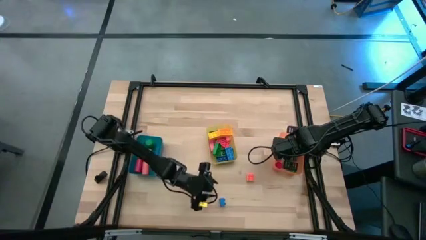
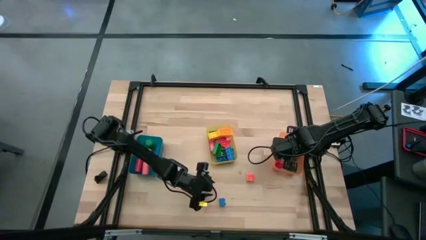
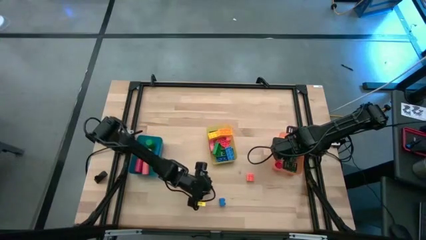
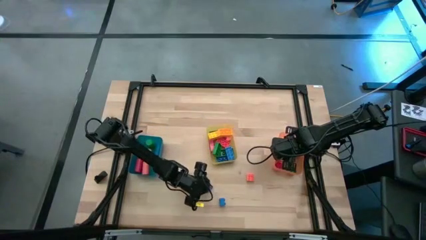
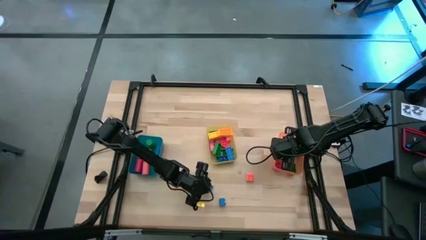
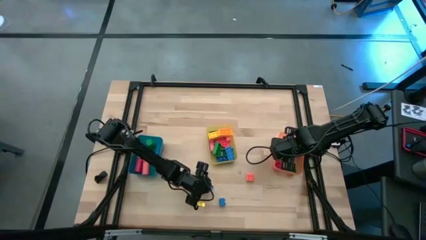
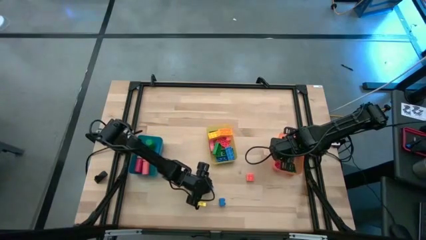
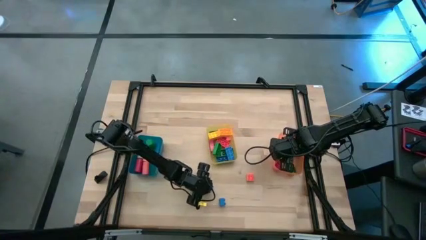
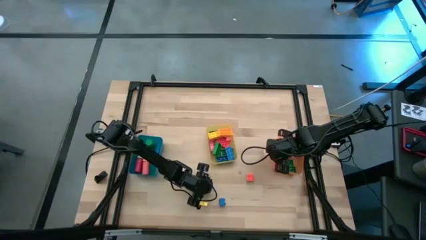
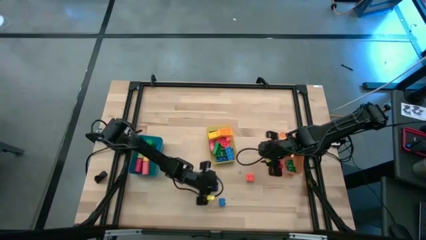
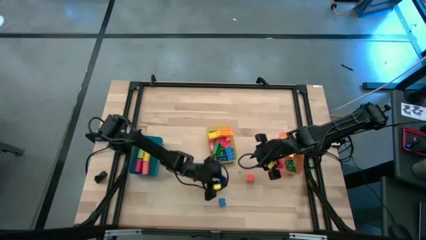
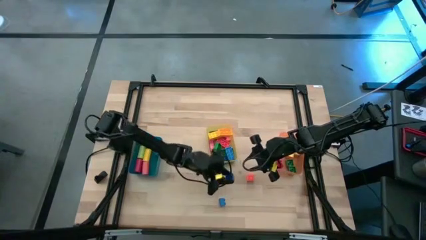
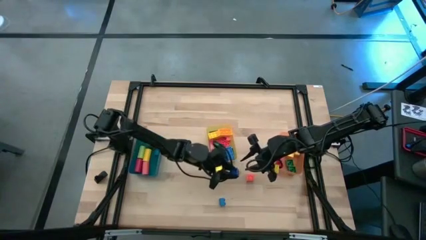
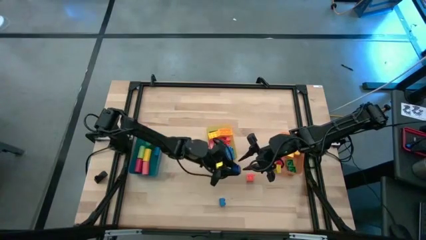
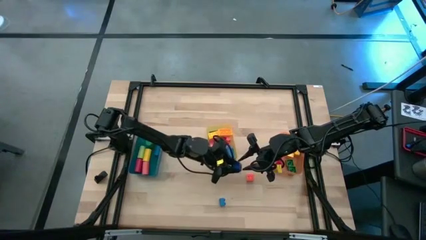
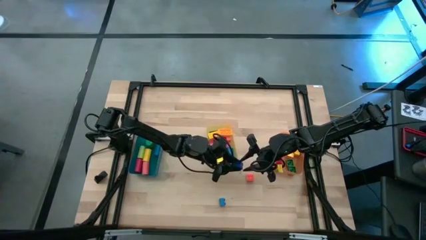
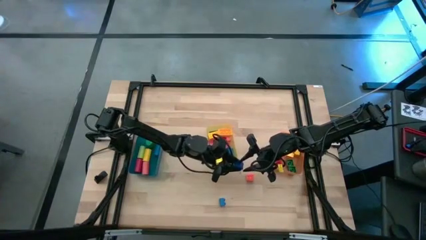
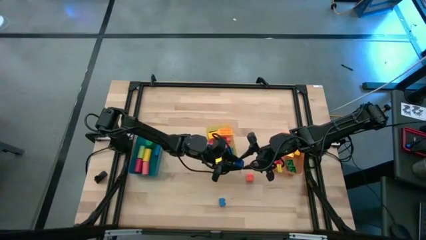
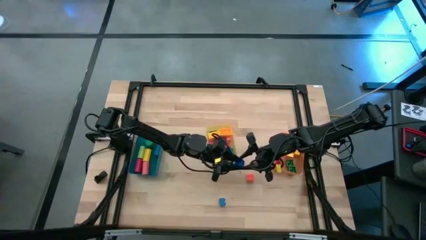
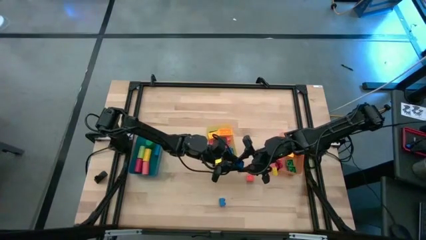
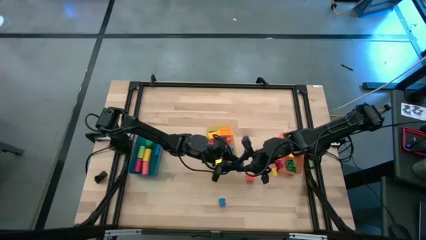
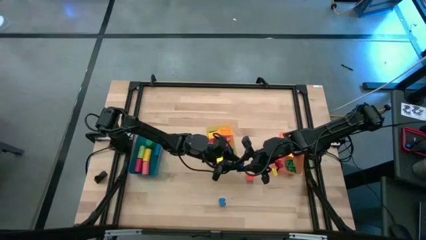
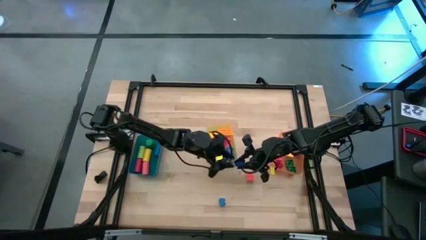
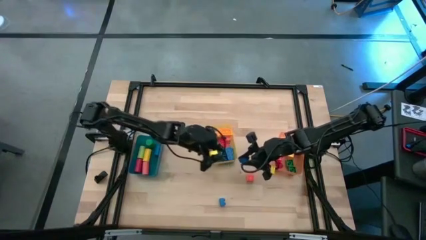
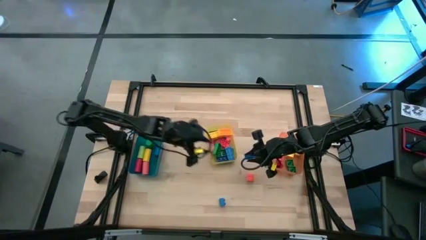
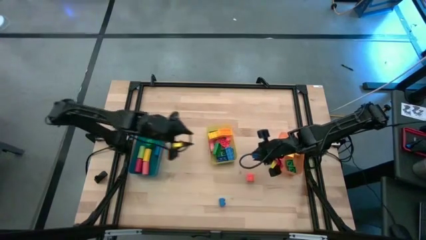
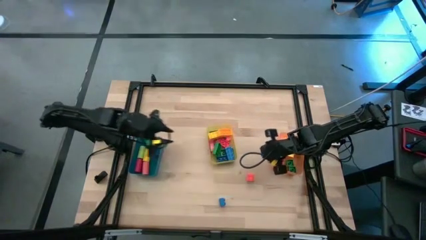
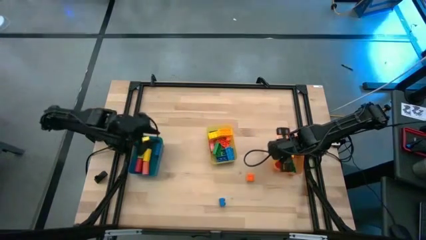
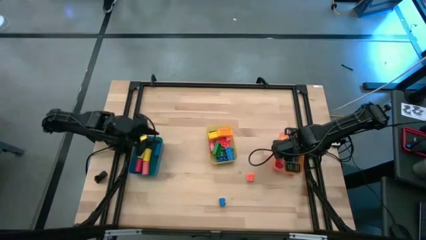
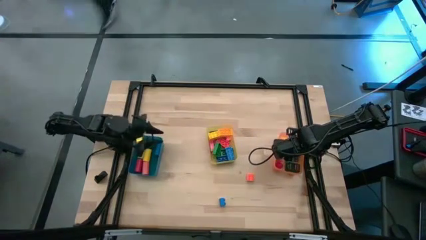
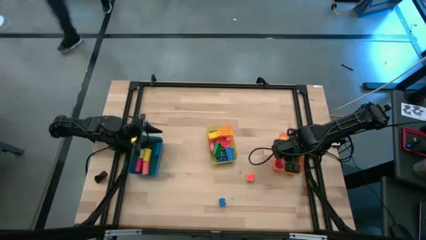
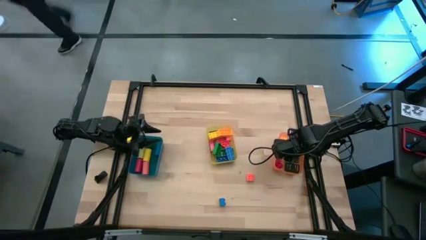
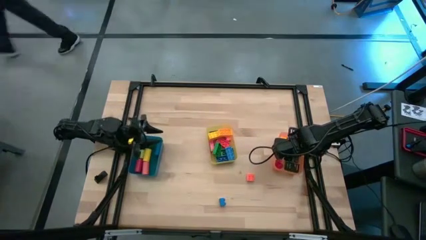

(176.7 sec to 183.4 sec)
Task: Sort blocks by size
Put the blue 4 stud game piece into the orange bin

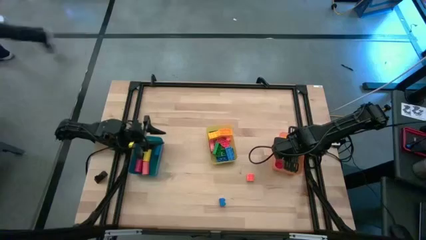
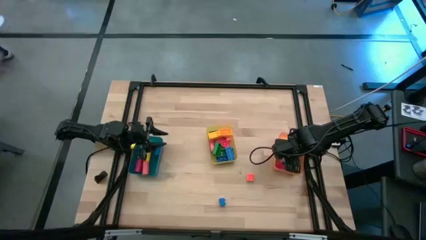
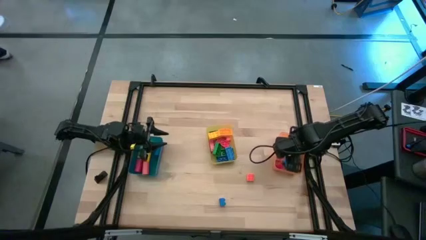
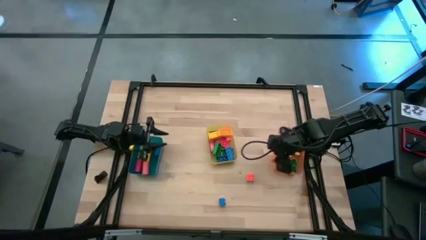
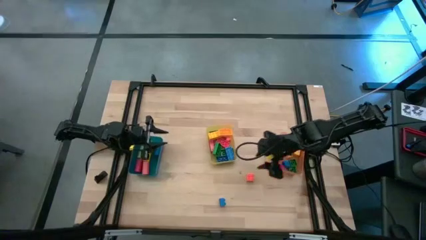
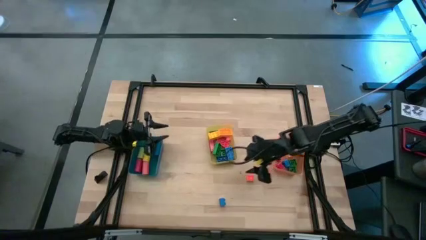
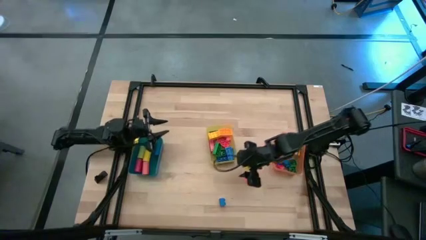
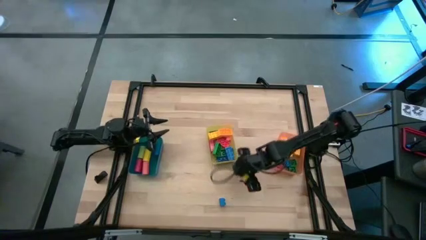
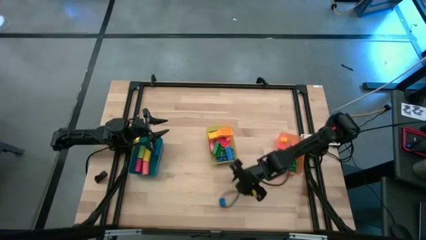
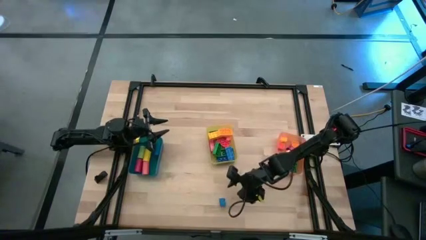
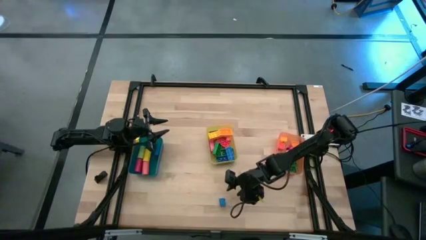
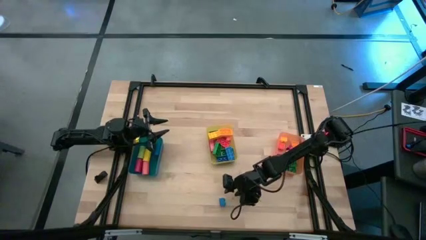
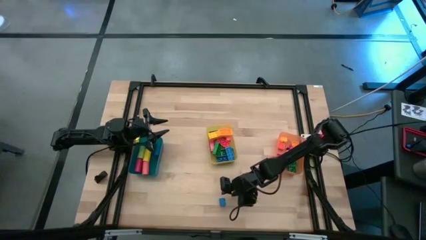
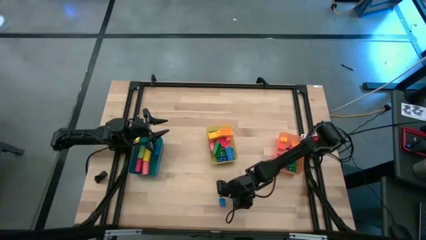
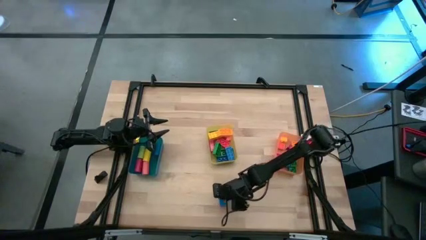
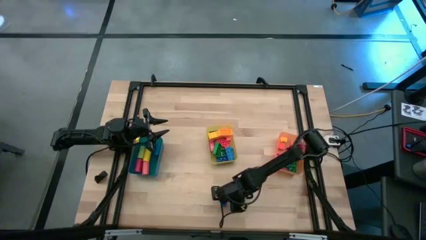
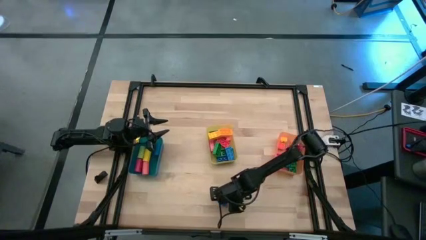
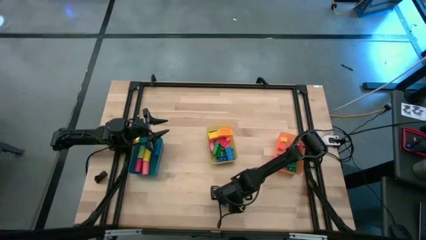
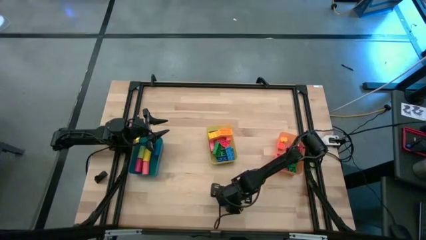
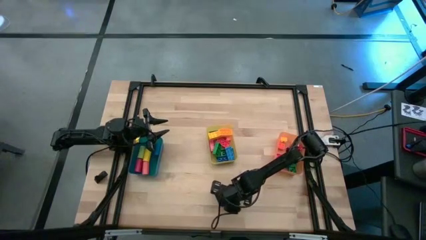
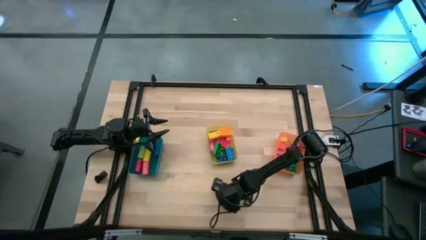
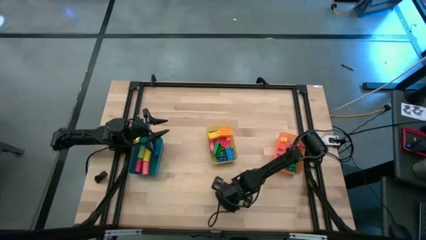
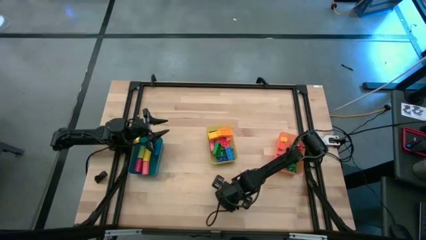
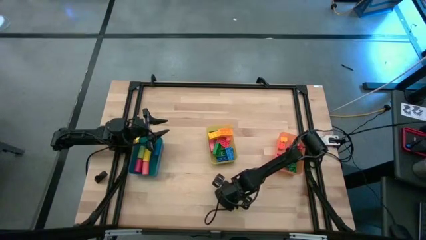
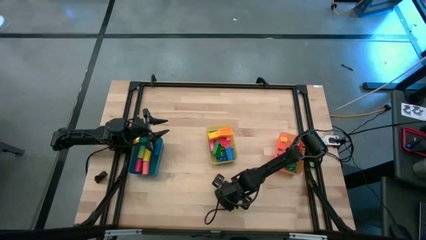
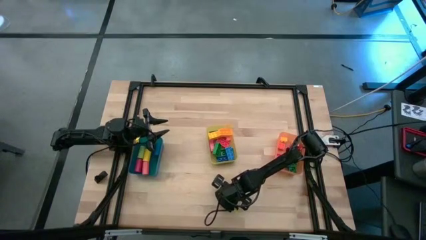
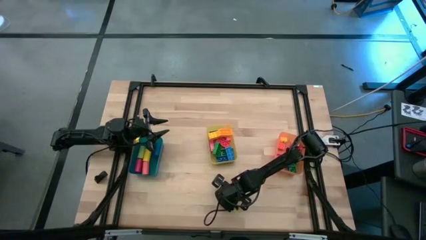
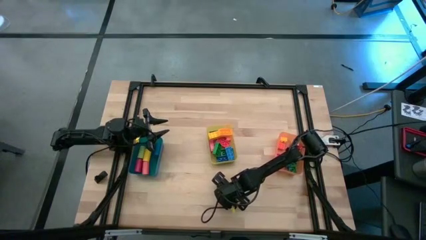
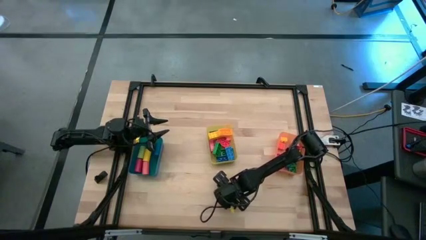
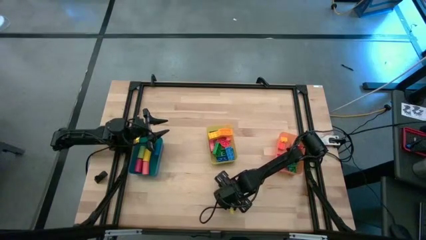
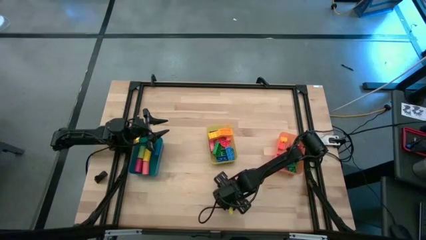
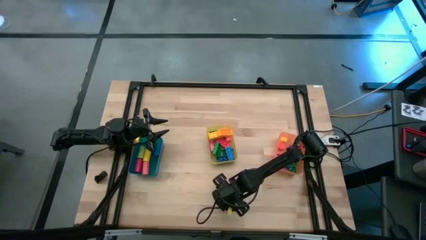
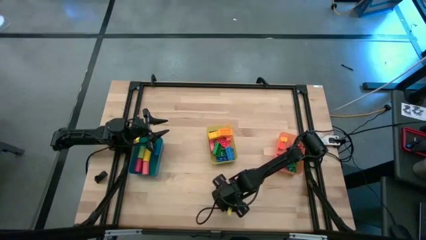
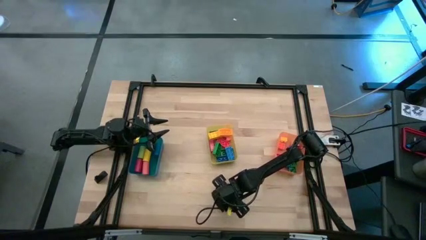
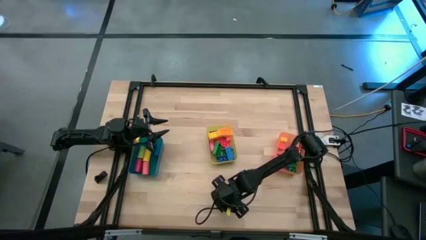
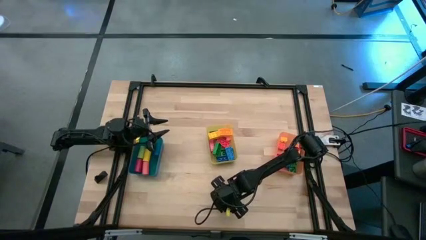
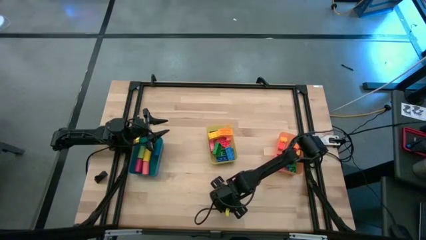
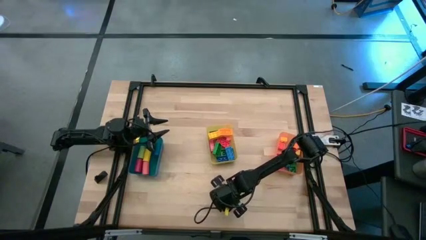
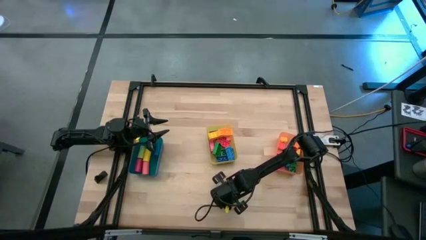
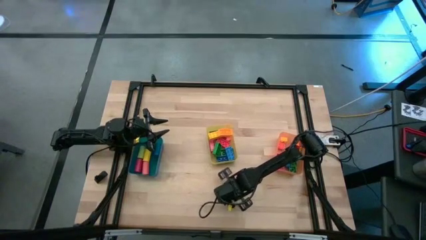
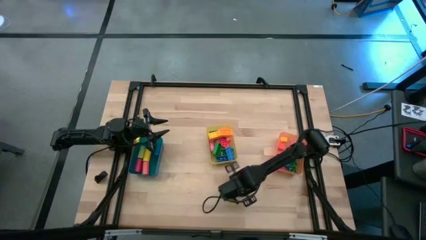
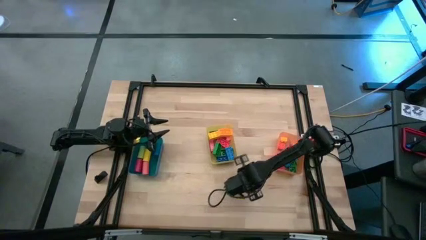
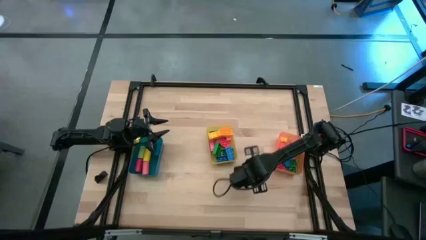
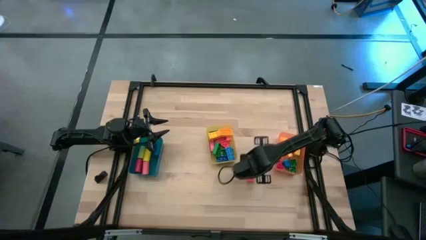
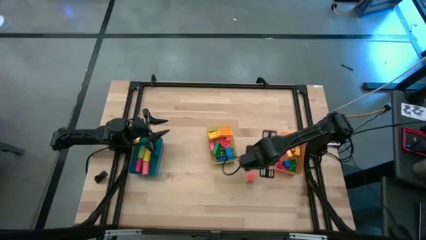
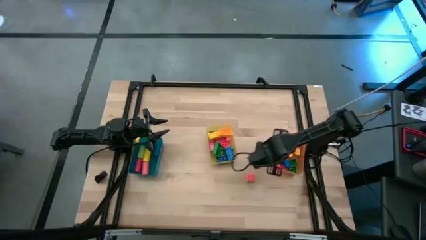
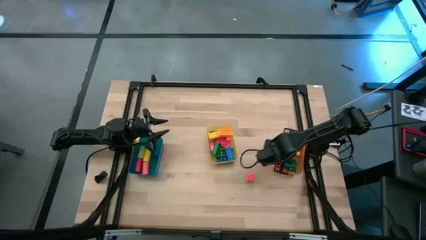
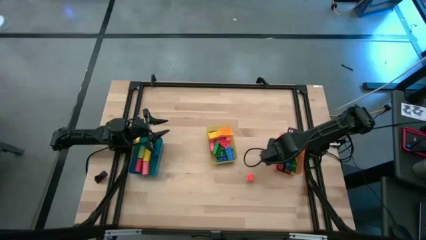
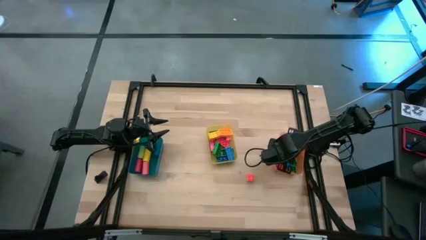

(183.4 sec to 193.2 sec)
Put the blue 4 stud game piece into the orange bin
